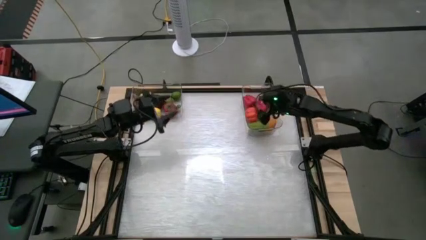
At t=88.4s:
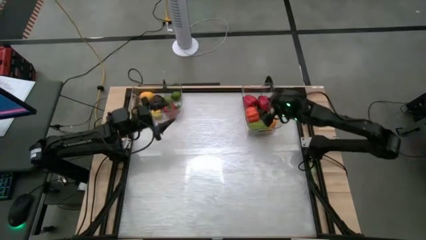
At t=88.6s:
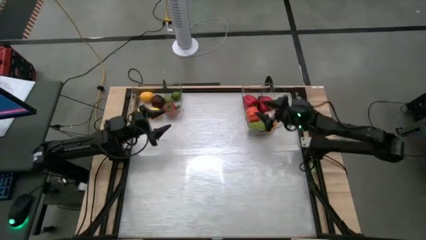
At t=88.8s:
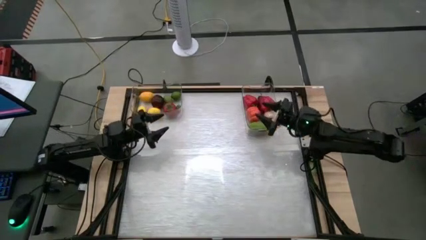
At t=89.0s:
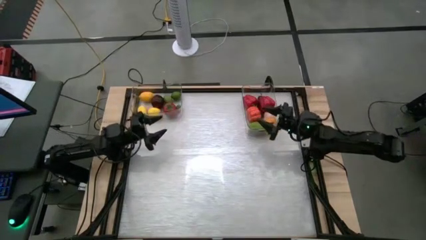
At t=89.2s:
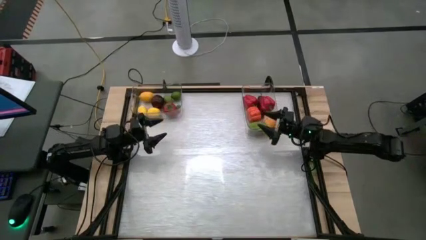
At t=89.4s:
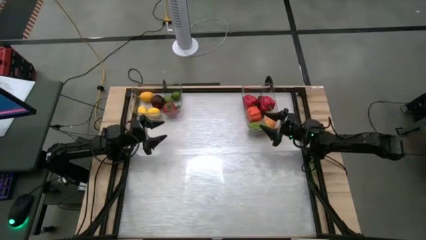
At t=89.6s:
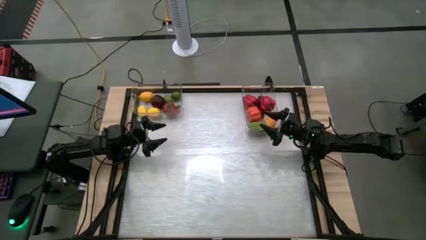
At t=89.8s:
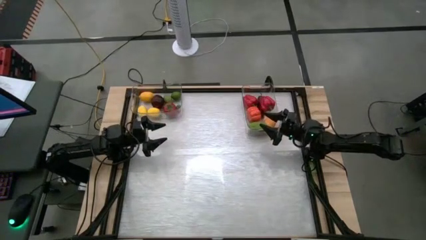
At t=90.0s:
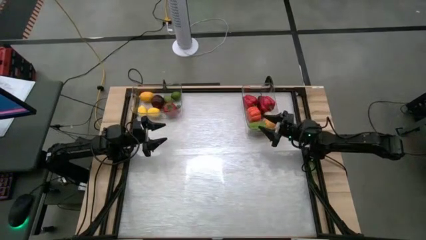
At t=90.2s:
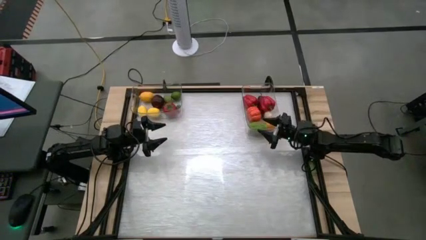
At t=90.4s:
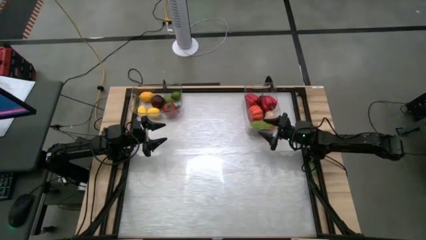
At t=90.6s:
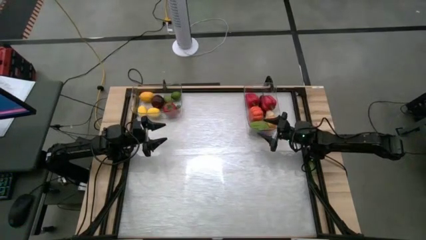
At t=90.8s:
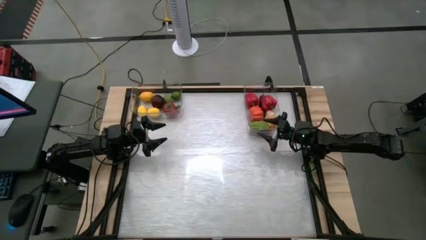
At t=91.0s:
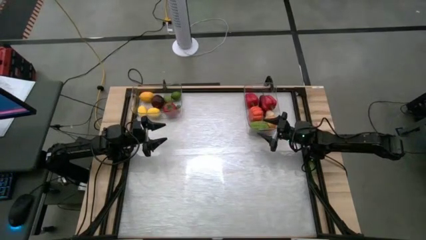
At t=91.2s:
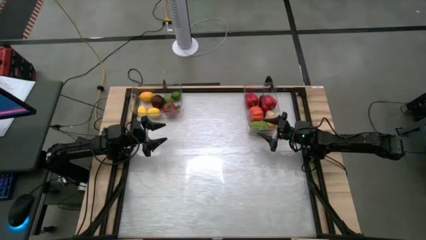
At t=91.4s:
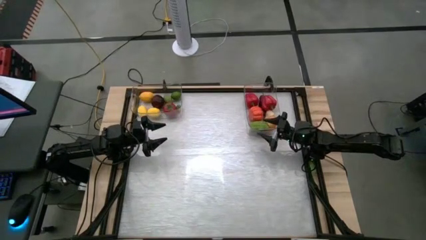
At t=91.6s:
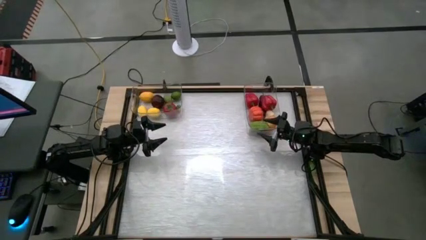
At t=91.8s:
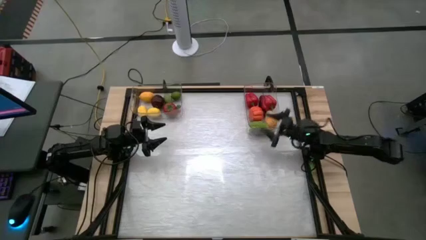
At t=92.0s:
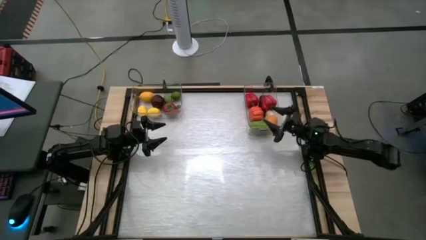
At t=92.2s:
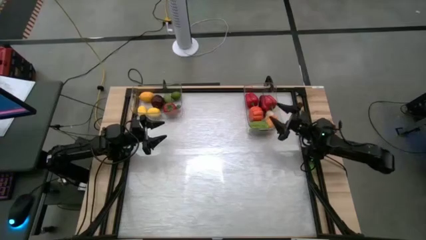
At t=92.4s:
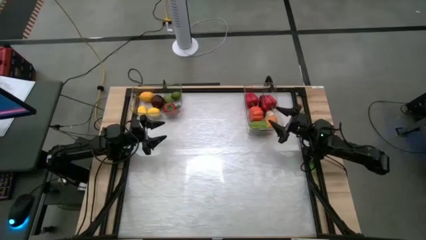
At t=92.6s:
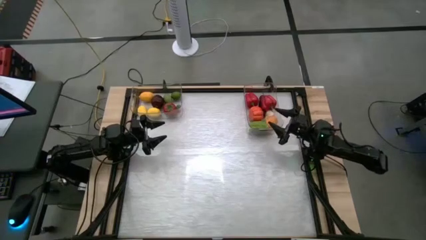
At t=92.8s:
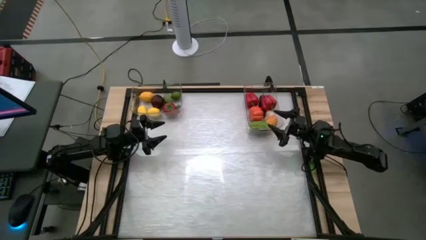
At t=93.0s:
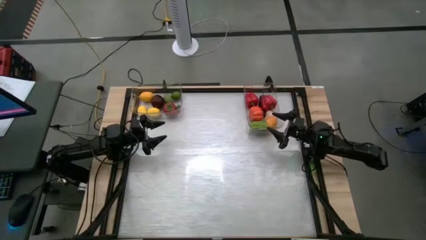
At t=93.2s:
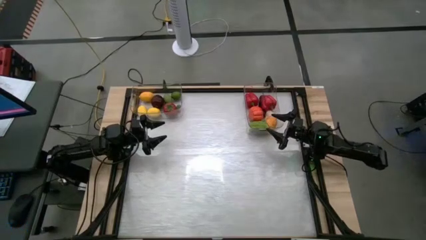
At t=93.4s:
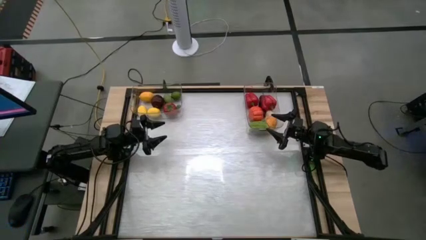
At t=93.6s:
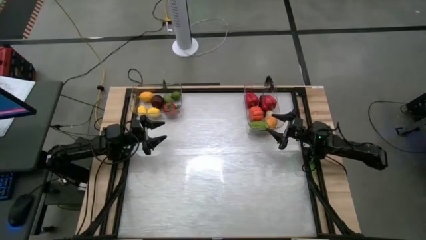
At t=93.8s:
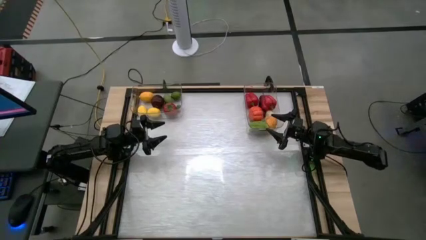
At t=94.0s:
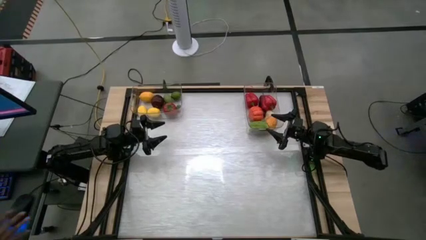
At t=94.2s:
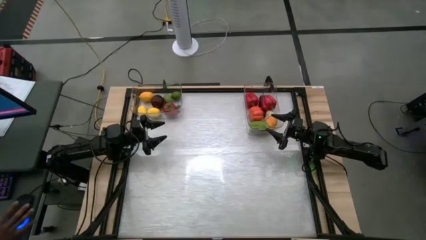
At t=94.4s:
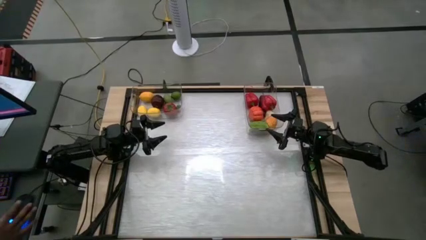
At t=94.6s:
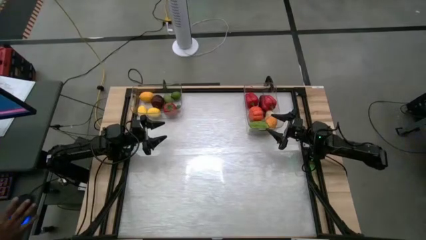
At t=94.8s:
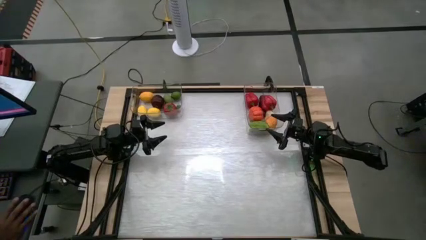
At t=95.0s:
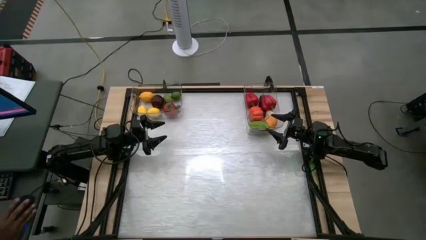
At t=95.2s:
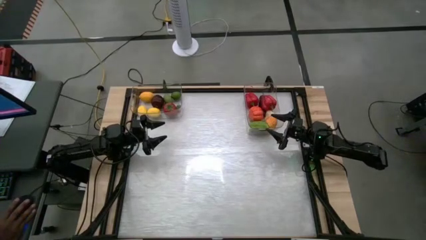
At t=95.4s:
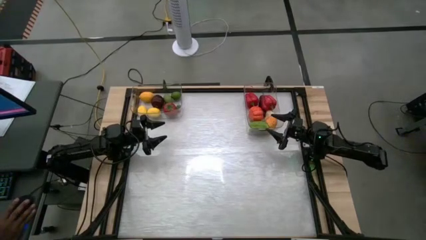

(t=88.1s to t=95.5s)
Task: Sort produce into baskets
Return to Home Position

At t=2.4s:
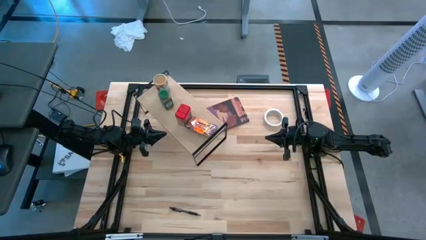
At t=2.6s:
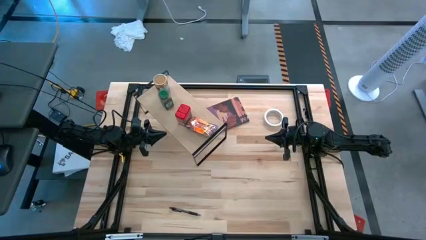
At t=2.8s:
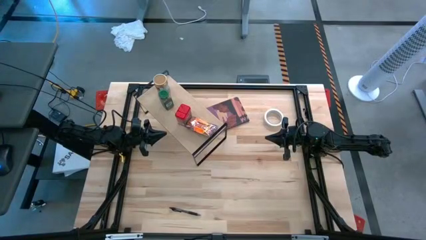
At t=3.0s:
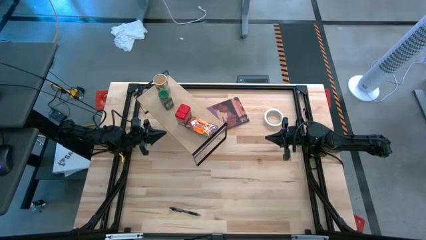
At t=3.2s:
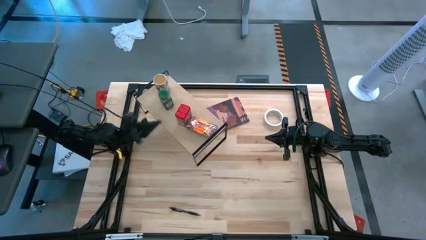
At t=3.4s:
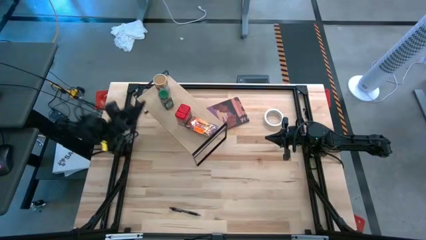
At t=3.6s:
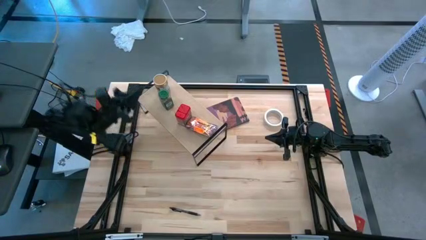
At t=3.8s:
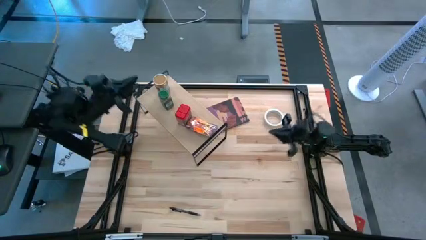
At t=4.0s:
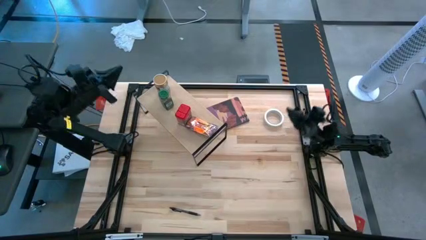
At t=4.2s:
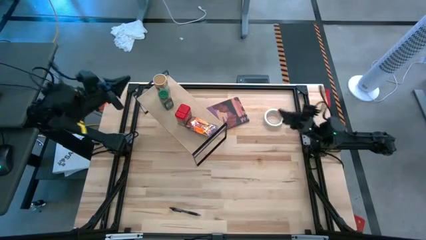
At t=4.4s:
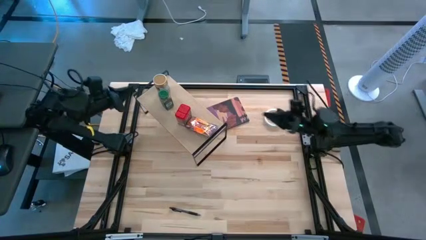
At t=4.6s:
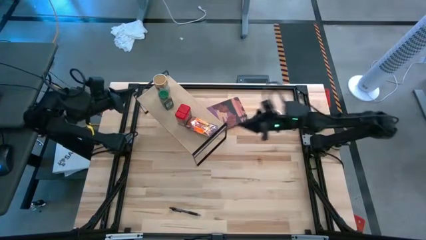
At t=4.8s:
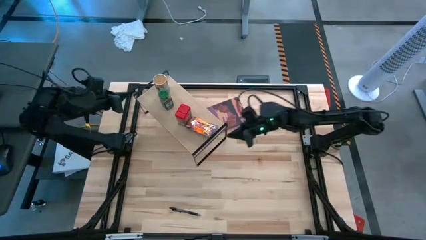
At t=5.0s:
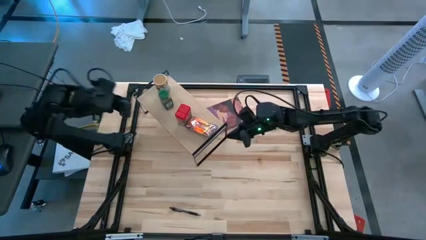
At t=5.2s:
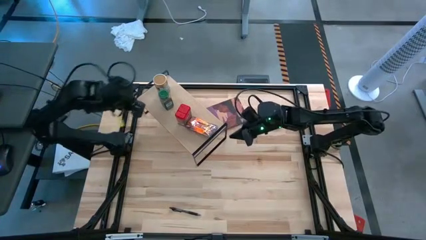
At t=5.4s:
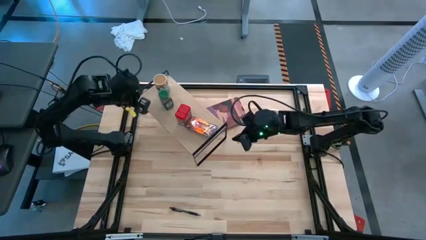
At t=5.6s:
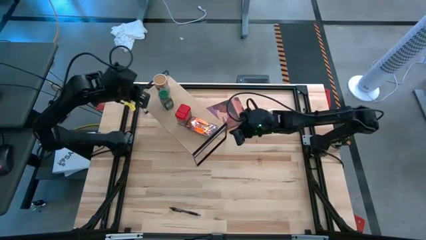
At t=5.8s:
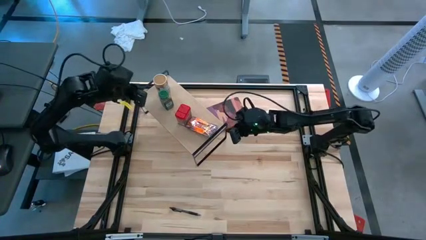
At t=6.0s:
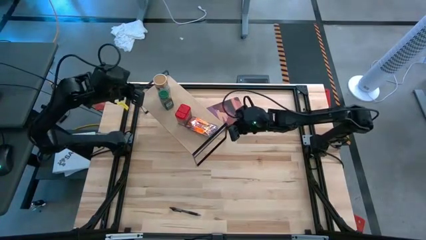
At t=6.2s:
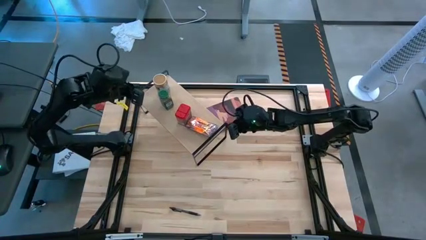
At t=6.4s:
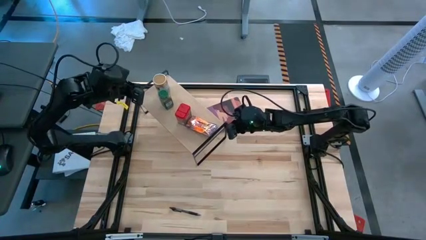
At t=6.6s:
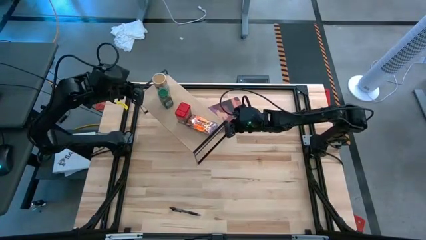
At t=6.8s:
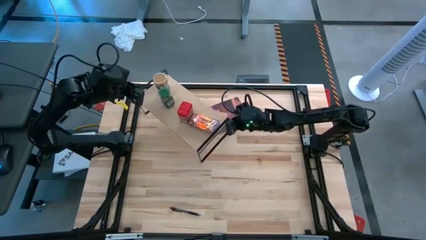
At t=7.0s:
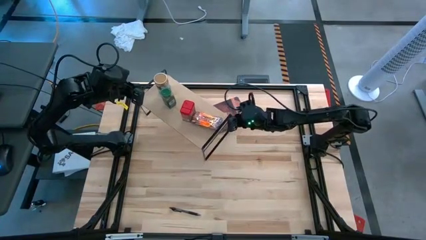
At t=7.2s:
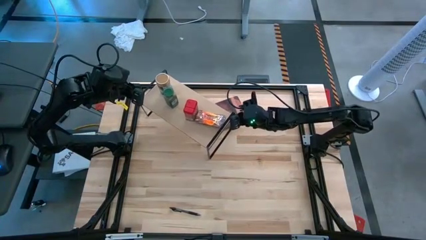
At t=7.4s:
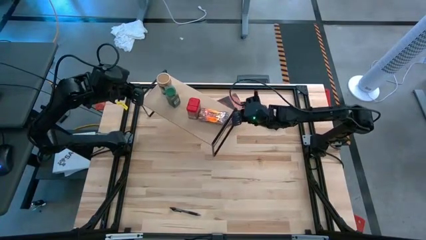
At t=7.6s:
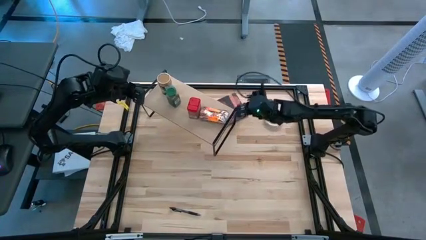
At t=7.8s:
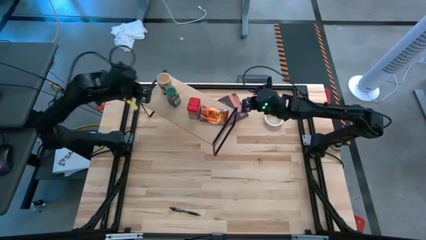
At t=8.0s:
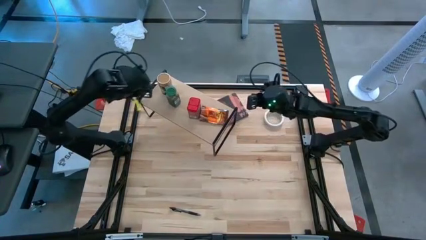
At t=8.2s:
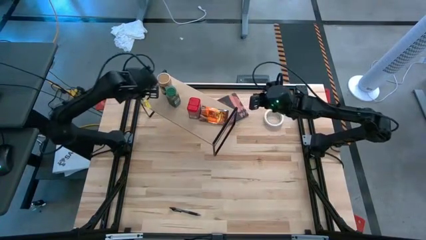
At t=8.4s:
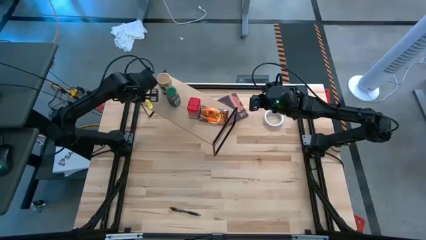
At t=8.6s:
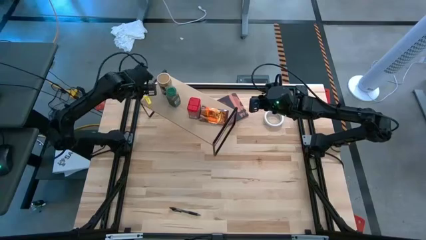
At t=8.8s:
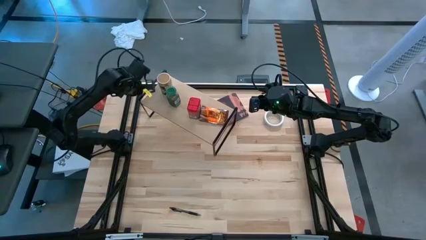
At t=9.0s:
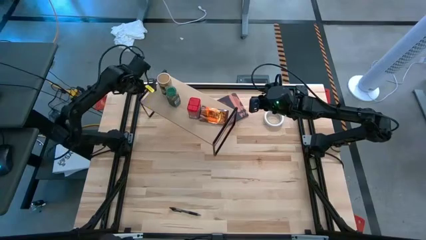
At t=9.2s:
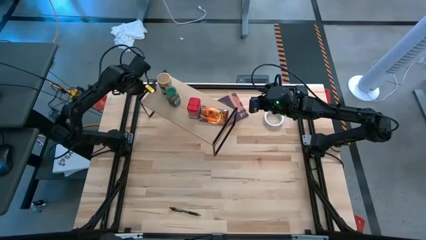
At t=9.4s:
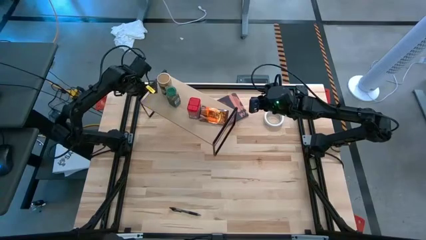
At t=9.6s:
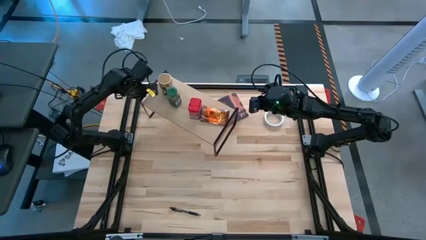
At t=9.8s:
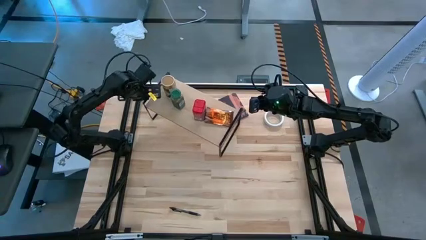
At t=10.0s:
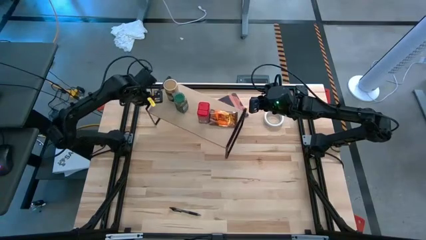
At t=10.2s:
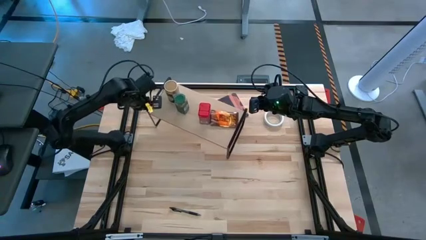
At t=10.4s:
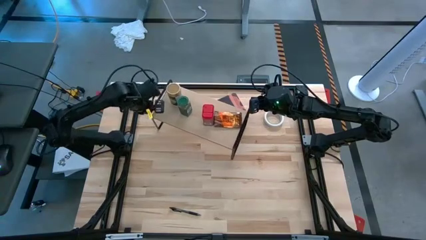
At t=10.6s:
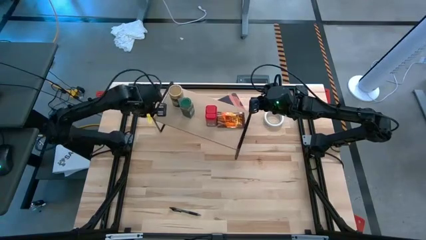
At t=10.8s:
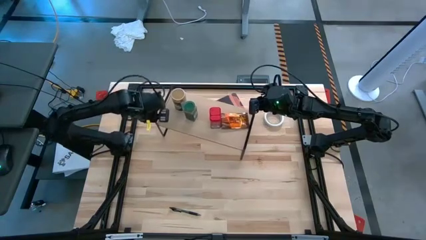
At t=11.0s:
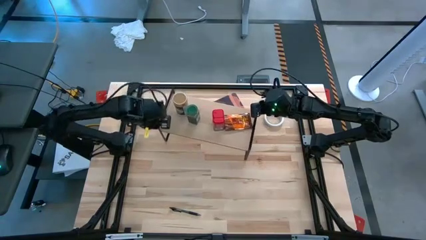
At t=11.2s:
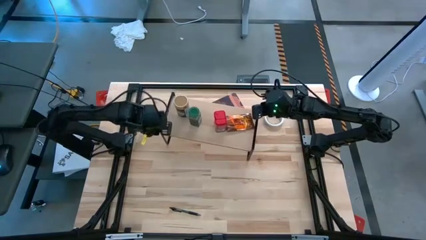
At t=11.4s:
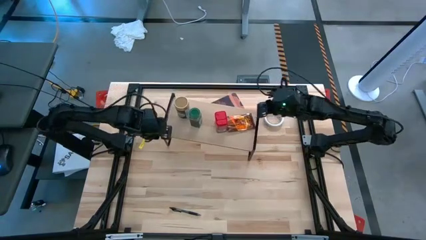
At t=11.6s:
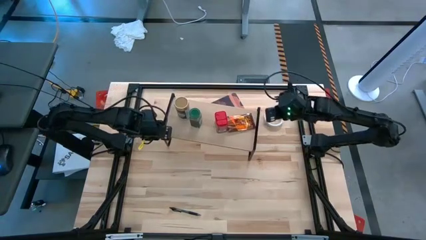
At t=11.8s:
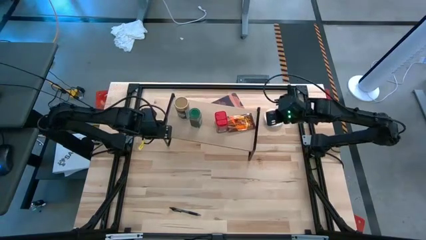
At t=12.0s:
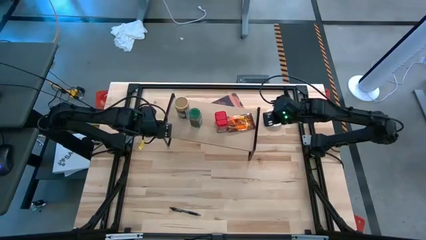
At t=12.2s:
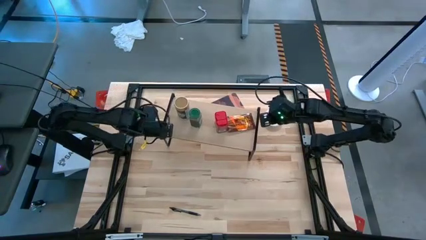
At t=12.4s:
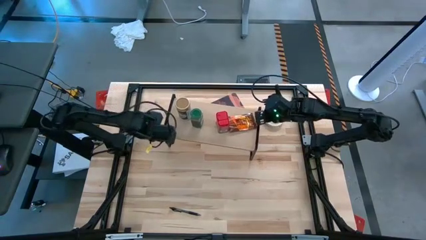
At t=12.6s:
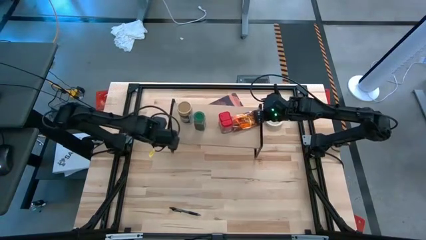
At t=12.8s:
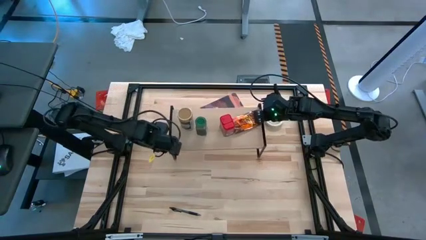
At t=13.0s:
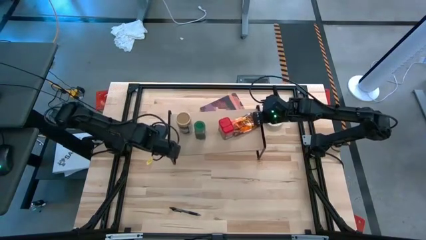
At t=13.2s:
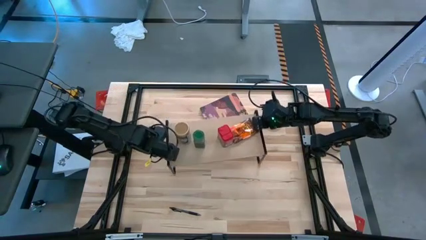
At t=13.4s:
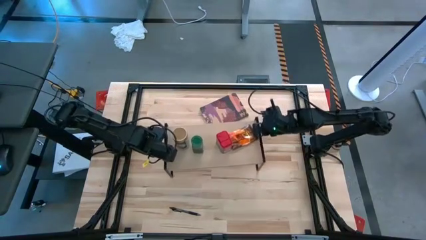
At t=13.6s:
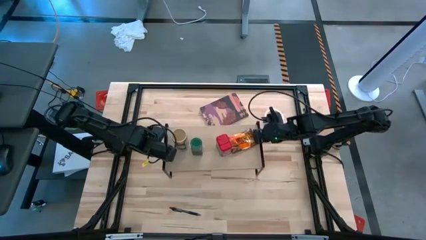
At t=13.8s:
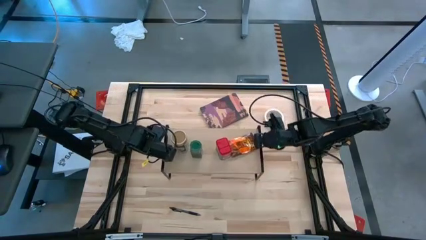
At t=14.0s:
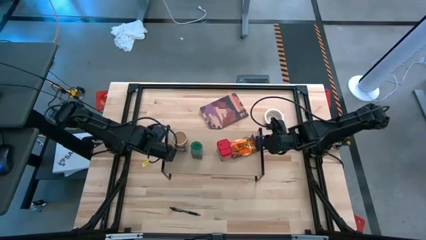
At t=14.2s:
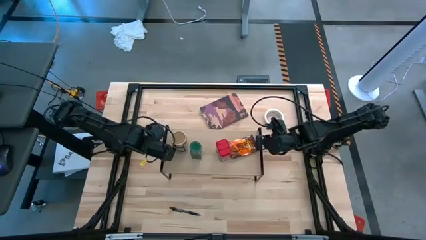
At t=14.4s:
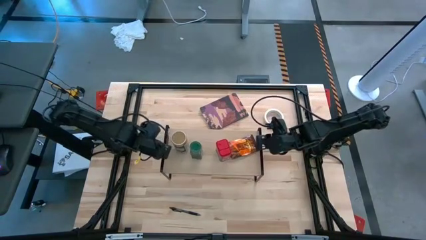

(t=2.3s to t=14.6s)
Task: Shelf spices
Move the shelf to the center of the table
